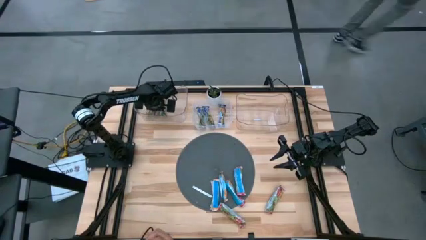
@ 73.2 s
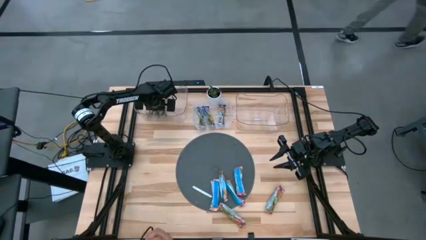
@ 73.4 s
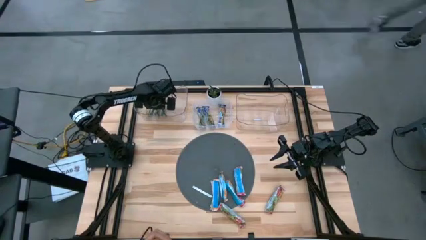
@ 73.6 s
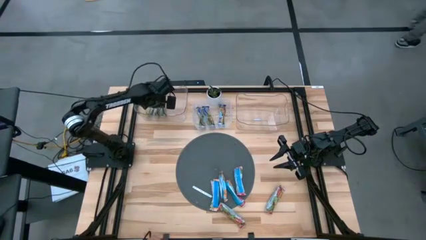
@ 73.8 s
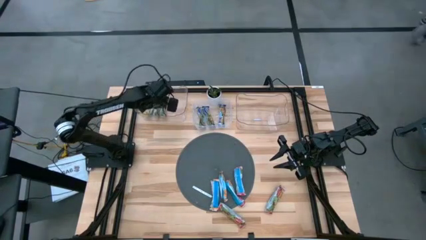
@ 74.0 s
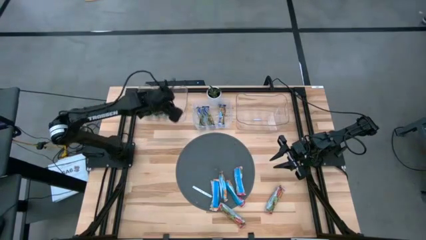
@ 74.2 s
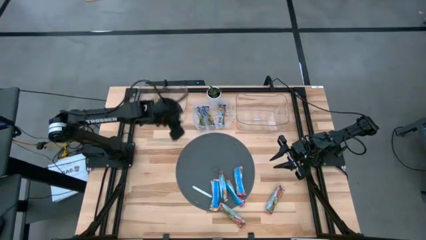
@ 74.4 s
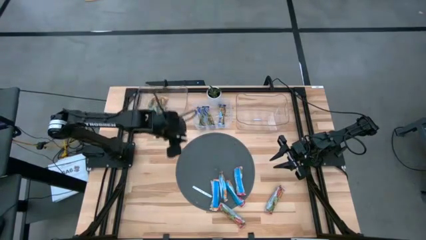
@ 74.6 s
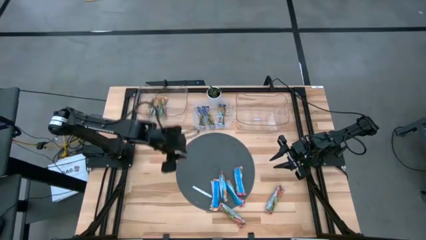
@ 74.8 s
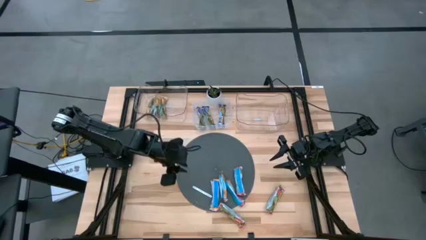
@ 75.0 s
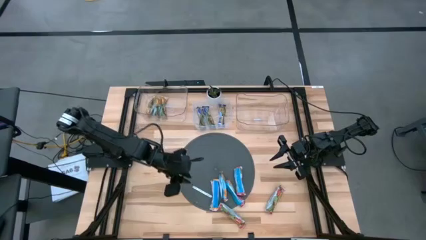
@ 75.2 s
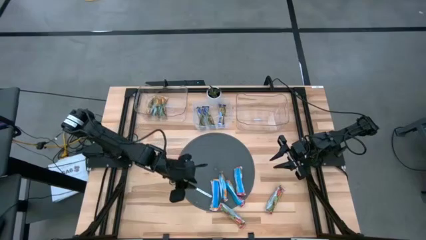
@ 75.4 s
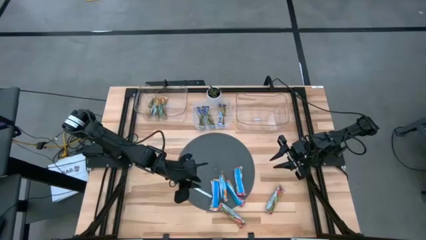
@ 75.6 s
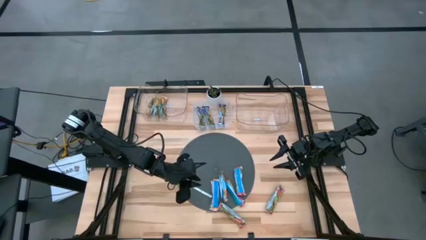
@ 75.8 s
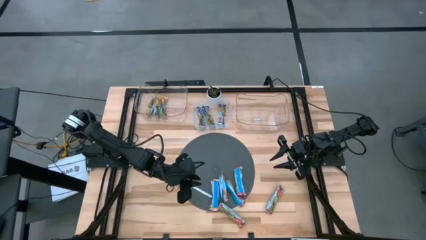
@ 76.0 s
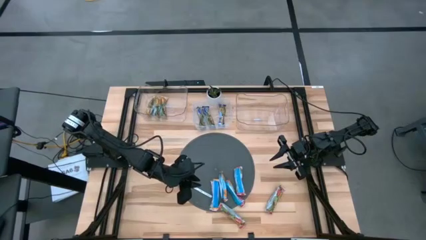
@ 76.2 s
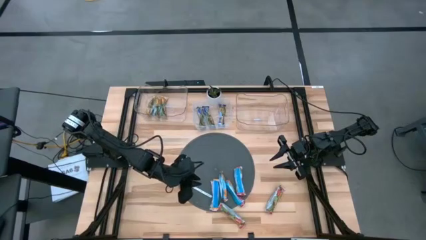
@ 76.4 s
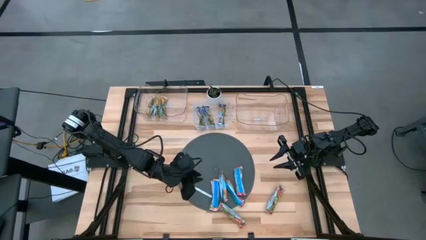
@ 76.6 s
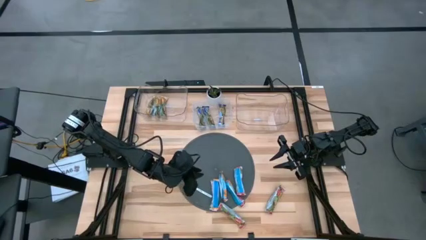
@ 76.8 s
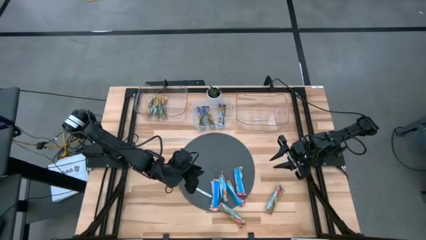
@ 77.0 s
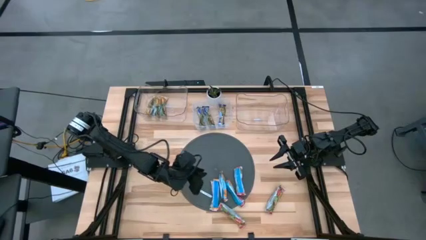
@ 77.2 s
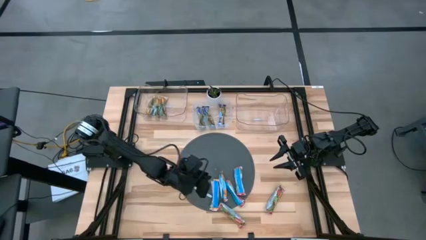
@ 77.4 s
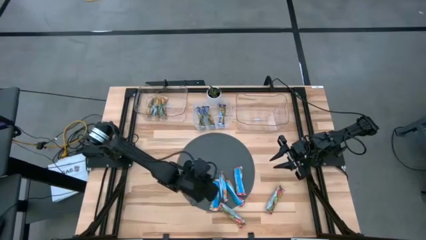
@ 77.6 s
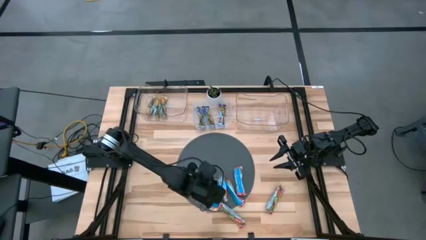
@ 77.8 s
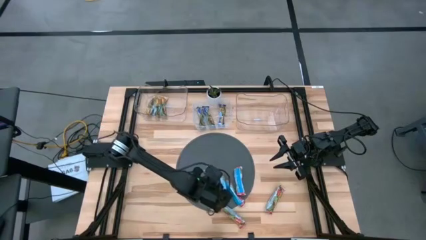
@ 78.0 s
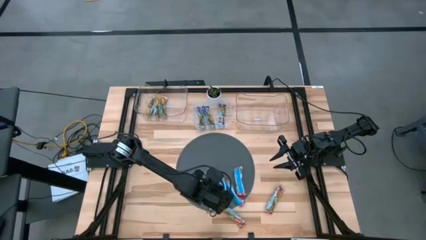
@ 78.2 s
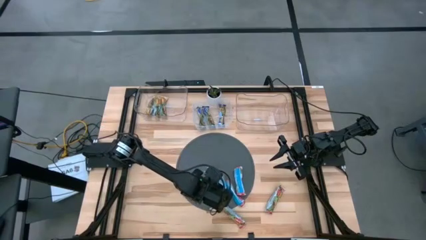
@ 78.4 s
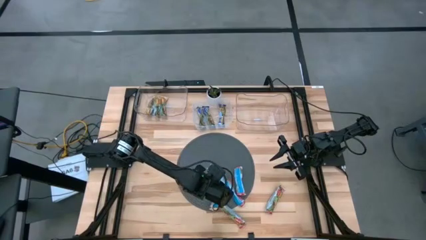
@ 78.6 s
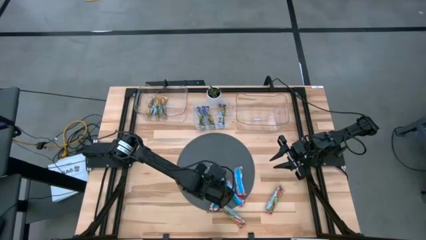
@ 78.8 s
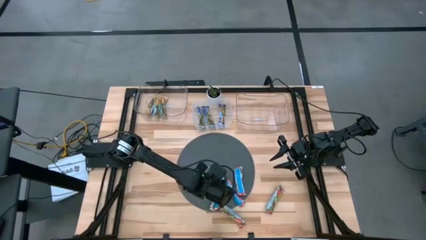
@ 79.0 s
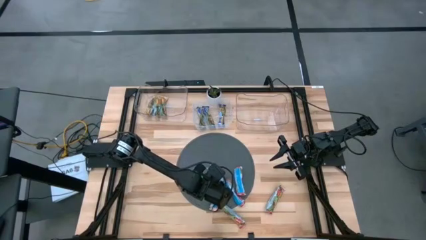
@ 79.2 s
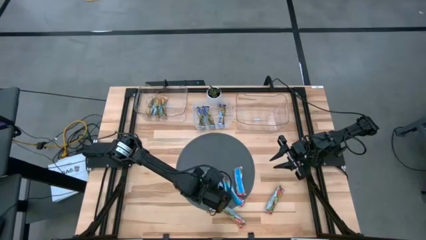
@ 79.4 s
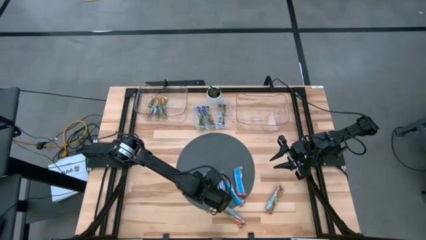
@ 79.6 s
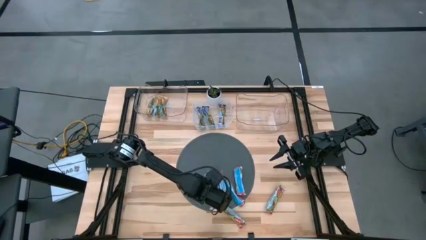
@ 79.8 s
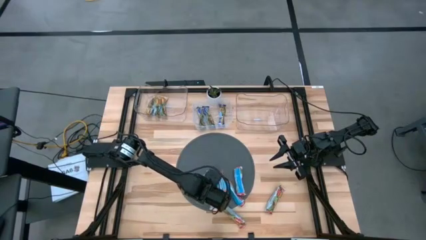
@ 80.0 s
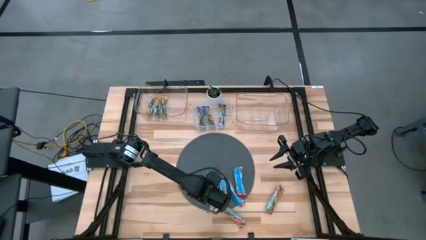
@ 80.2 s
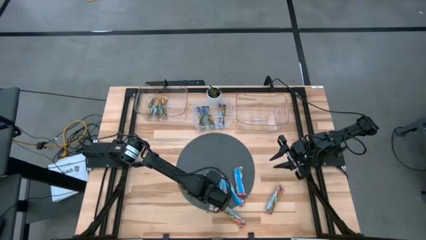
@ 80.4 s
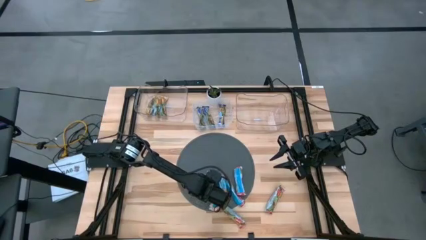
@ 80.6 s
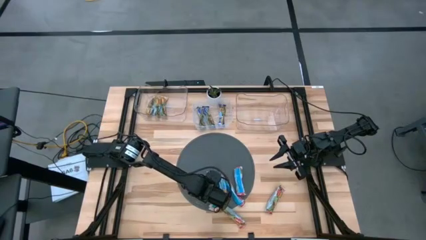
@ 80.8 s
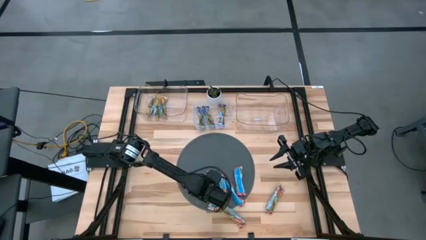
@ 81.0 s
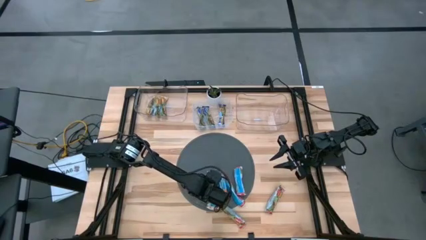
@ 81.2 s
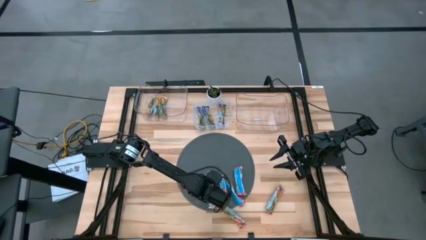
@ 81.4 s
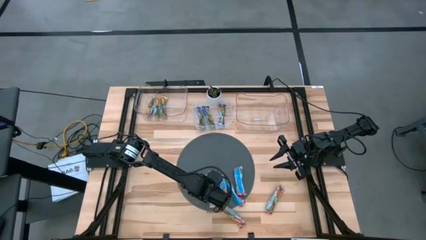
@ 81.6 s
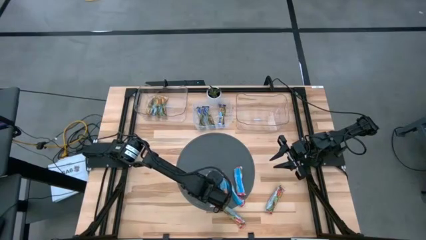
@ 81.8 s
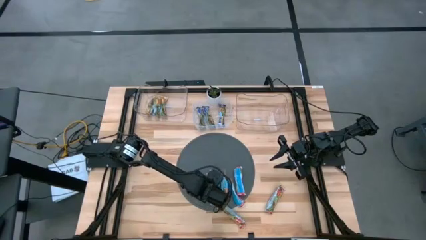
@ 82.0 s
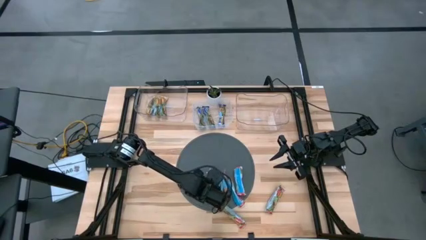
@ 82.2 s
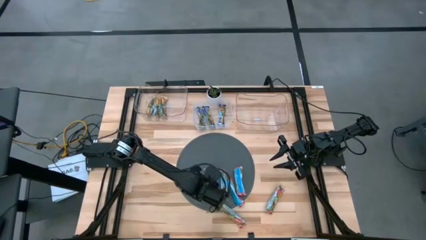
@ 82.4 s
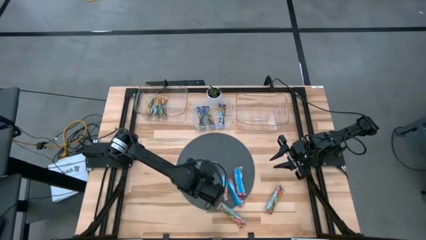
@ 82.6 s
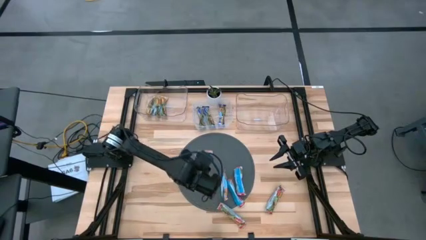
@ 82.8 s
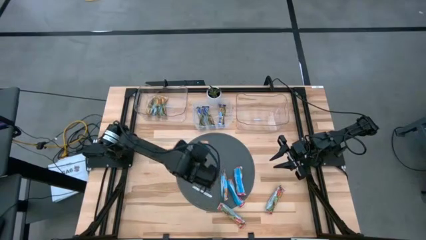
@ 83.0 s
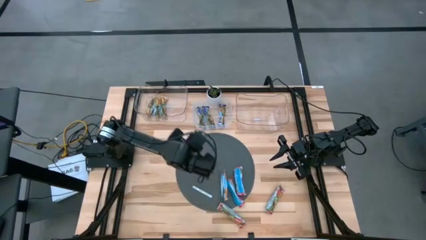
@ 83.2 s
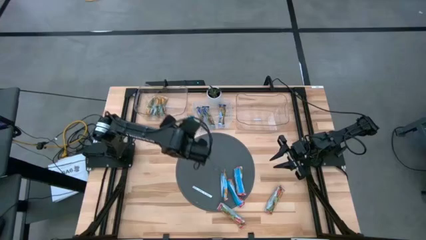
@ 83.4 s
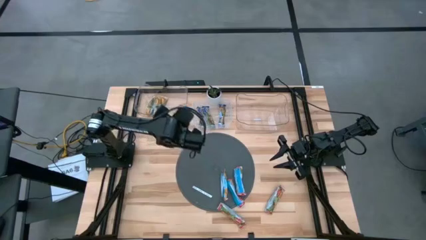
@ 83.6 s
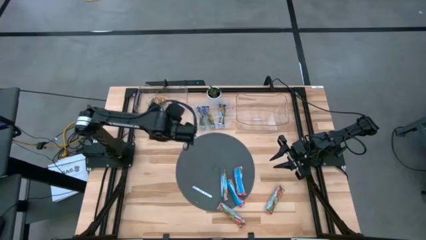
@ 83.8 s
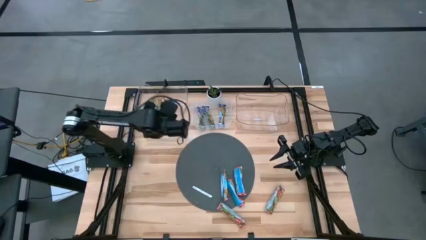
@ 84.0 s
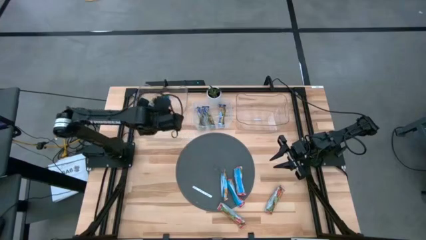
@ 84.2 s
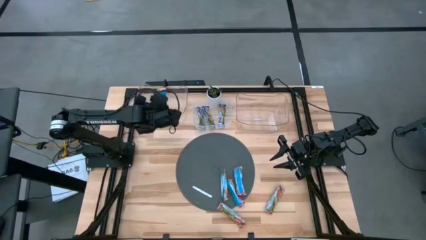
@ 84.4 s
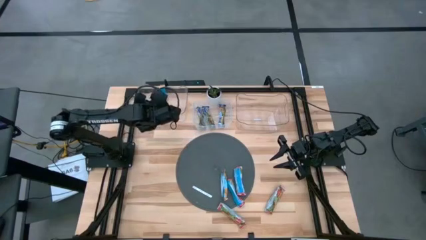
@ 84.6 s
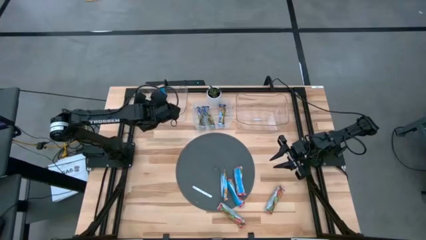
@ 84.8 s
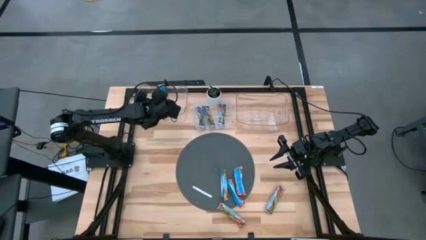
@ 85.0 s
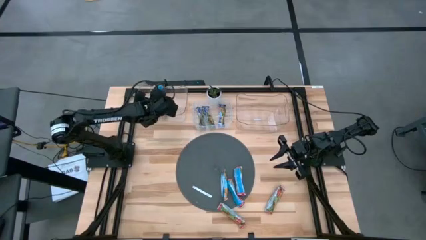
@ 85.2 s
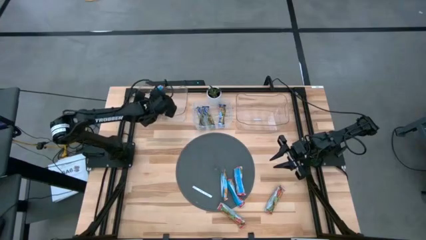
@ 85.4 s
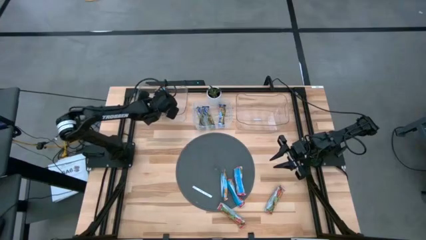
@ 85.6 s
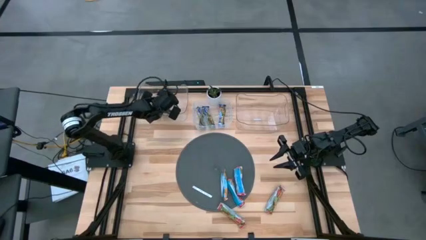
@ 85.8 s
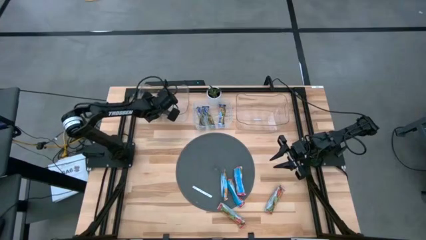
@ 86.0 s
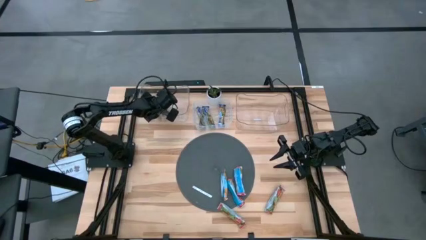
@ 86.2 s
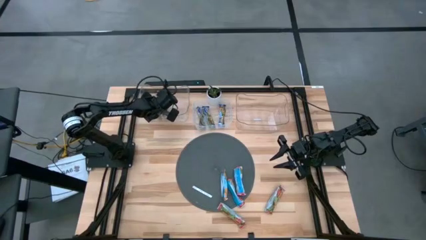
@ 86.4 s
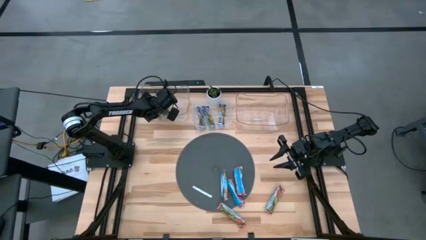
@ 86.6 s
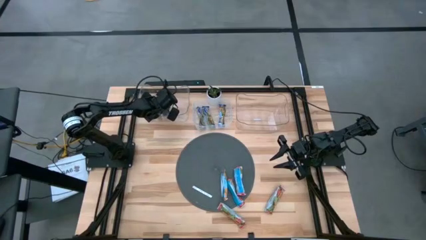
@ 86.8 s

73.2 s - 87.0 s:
Task: Pick and place Granola Bars by type
Put the yellow granola bar into the left transparent bin
